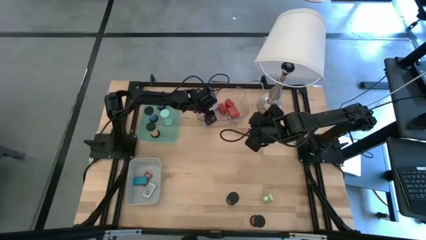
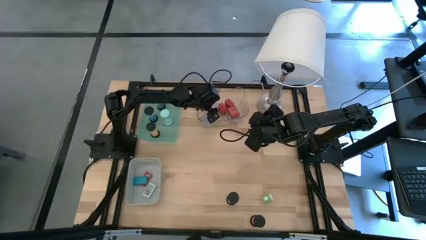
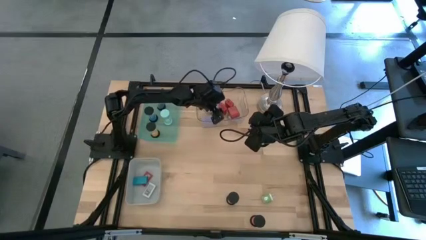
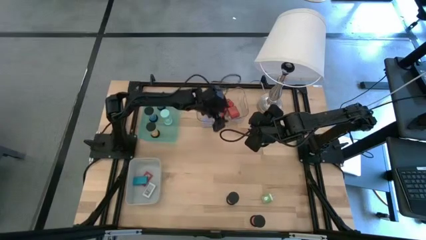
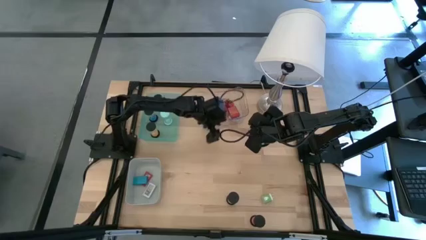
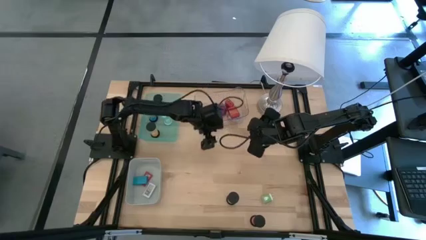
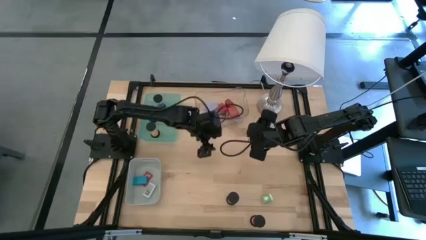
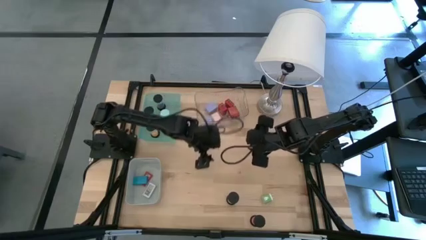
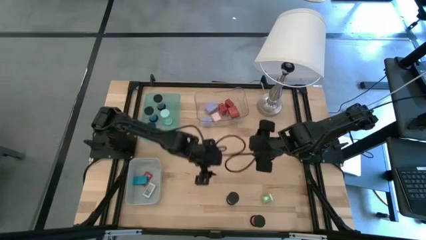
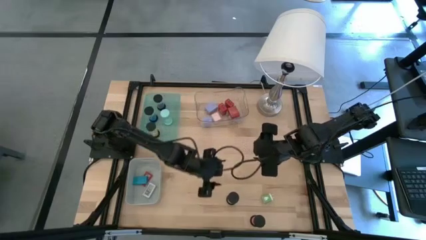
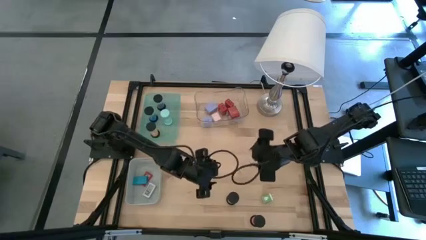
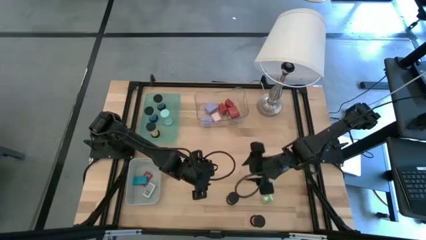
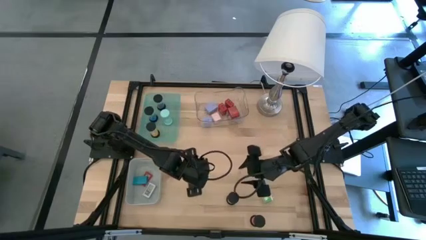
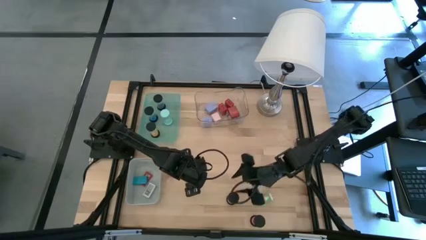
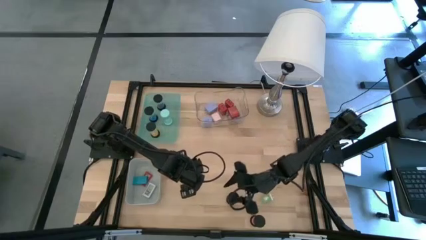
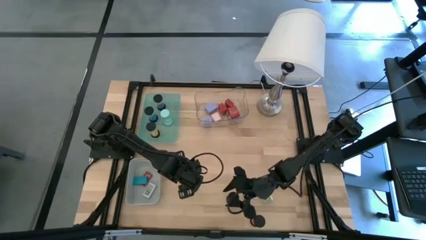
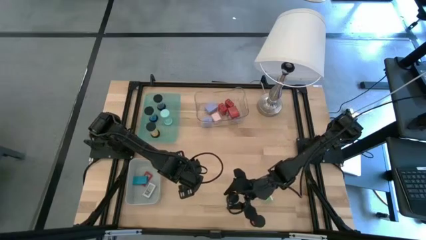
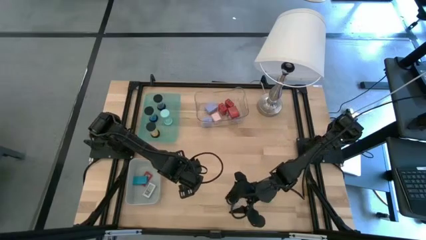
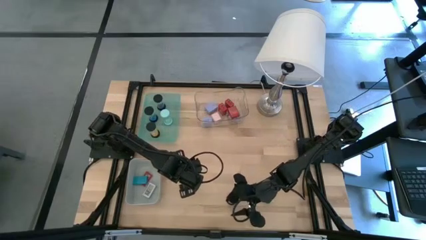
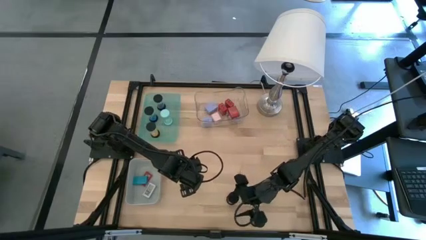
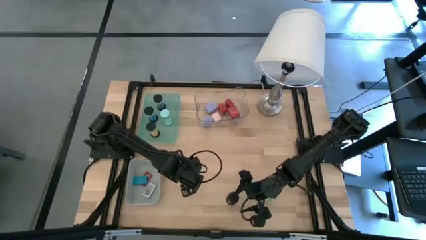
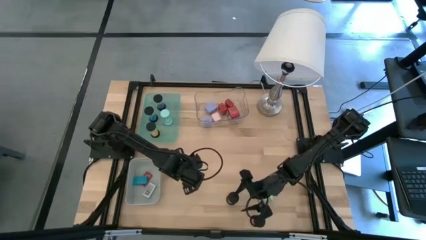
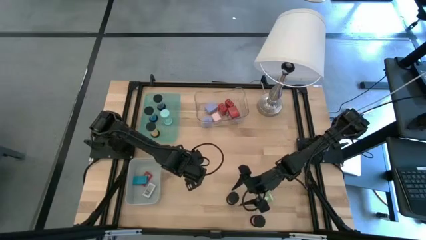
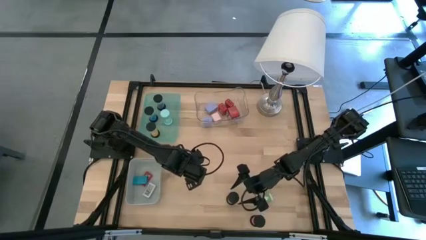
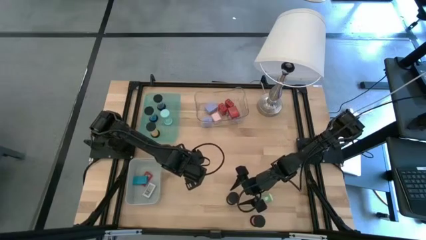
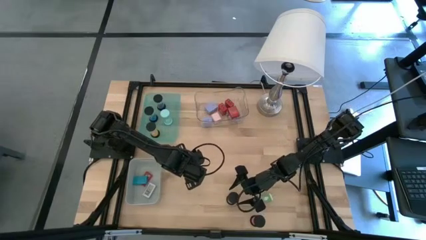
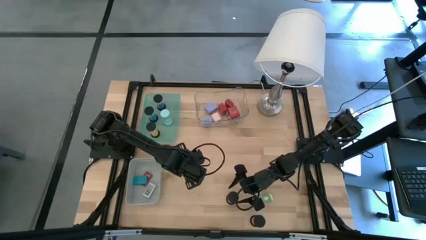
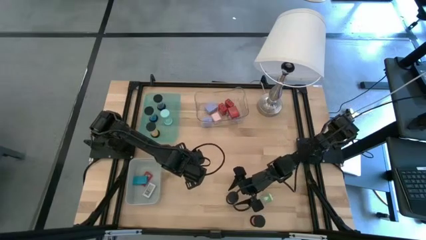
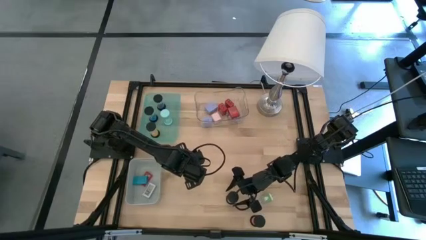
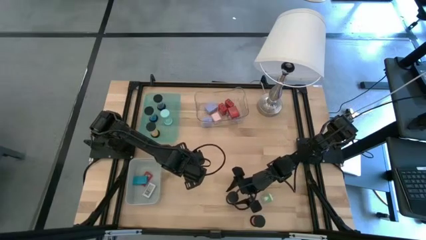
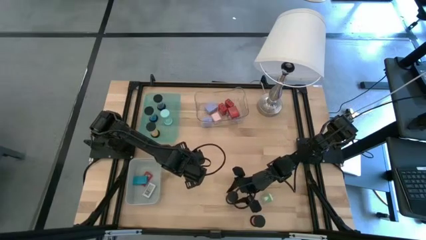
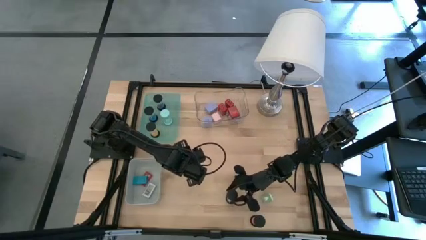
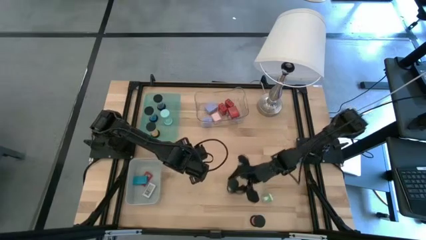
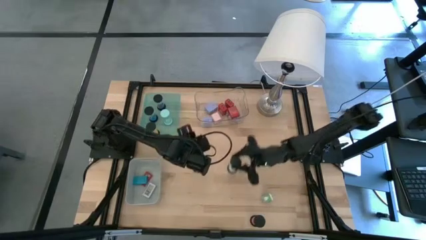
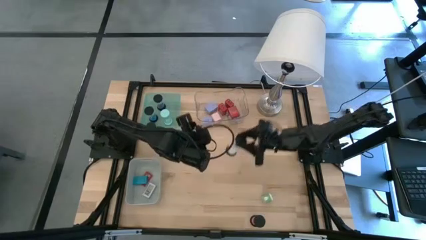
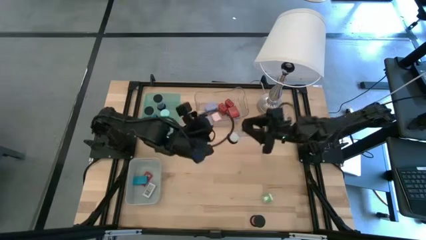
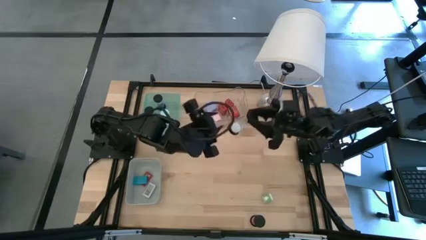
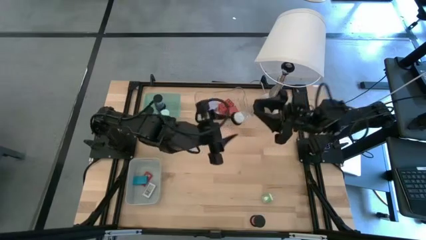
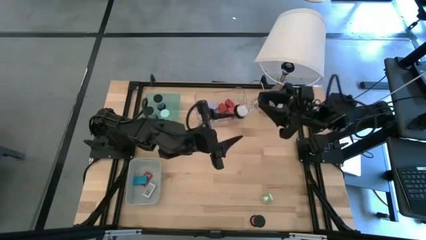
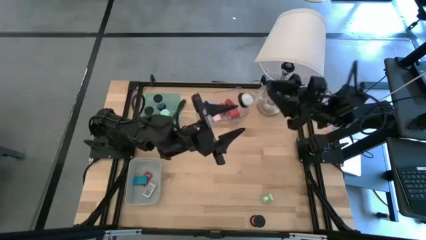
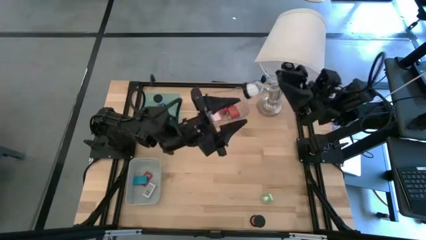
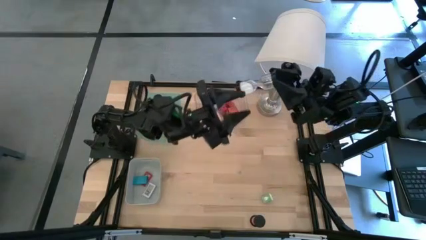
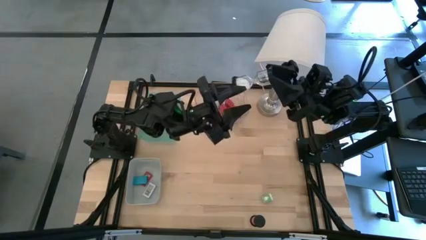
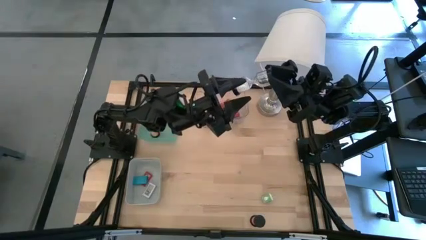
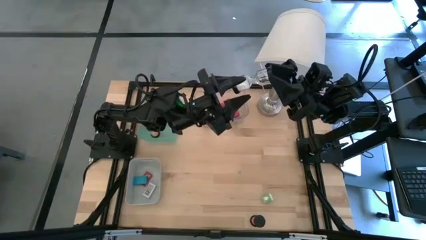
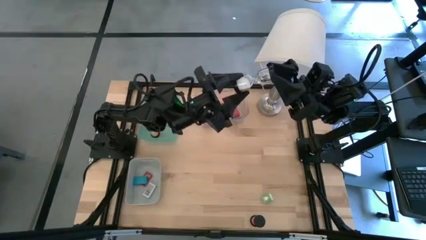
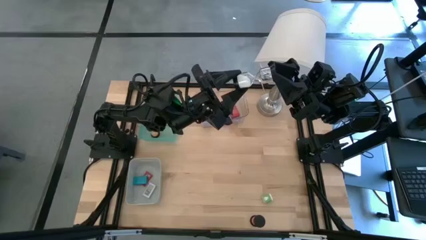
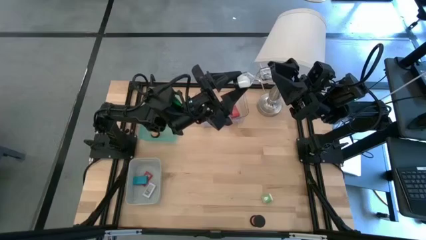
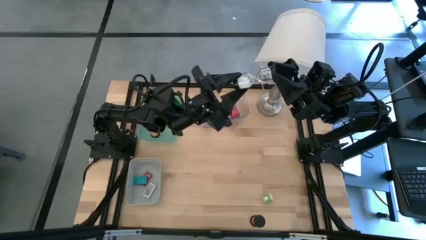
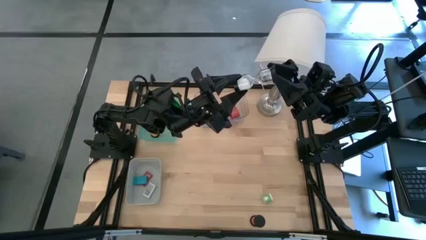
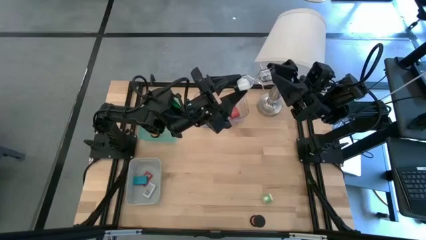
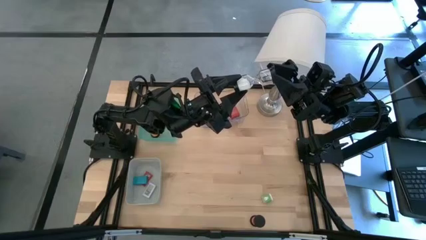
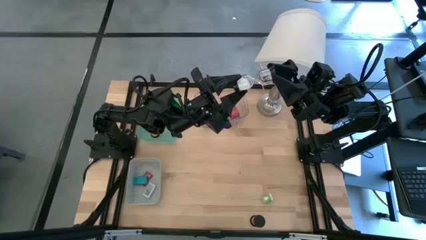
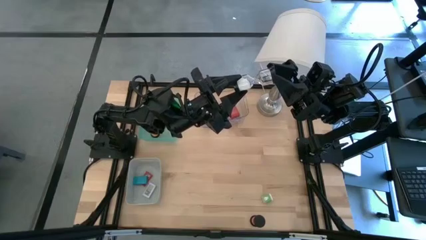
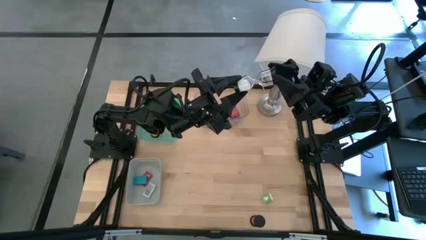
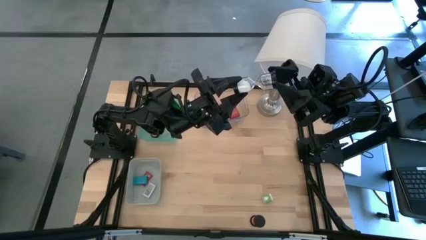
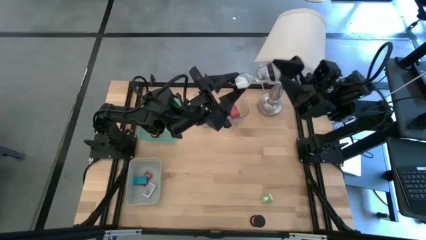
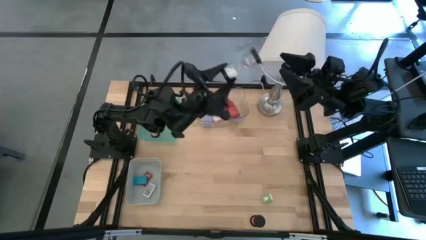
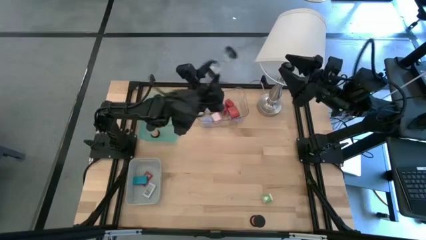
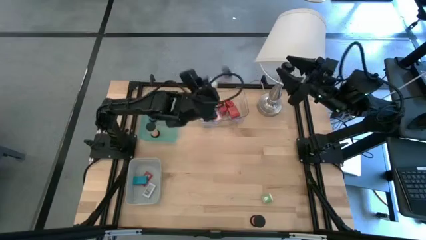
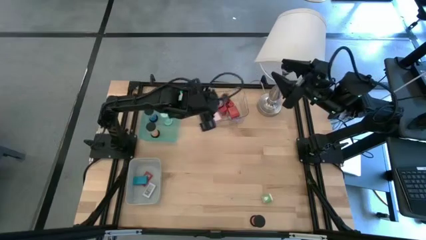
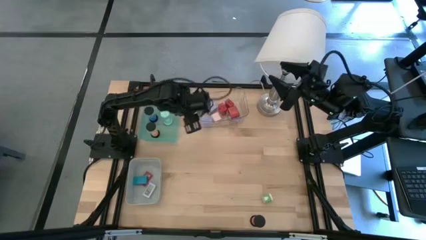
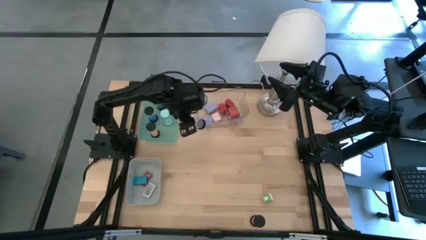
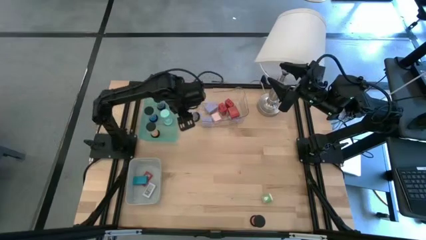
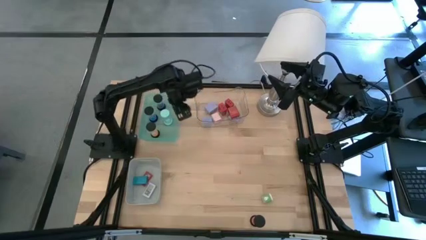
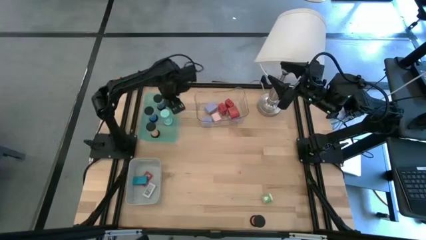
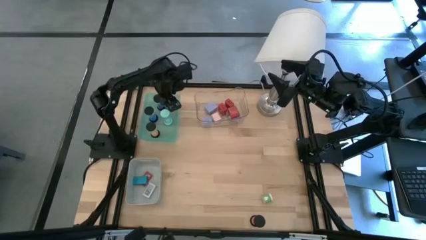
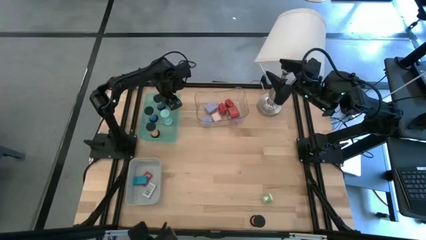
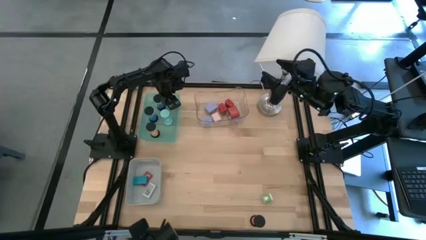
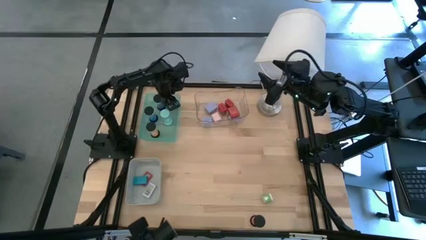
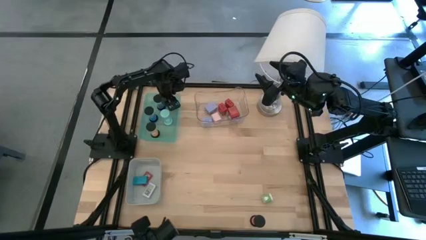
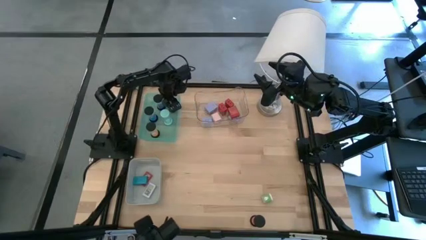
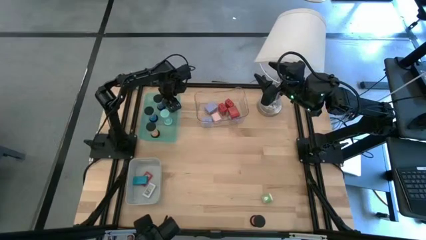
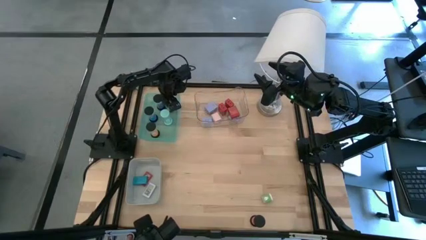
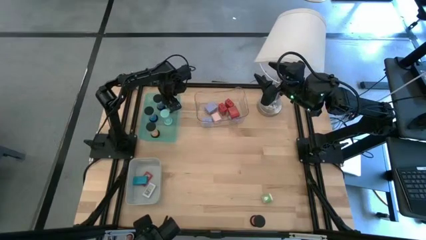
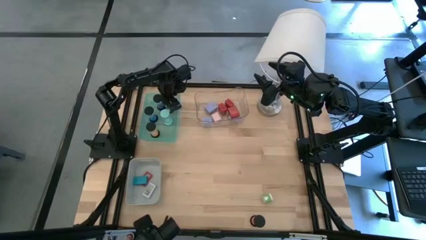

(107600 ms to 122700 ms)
Task: Pick & Place Office items
Put the white hourglass into the green bin

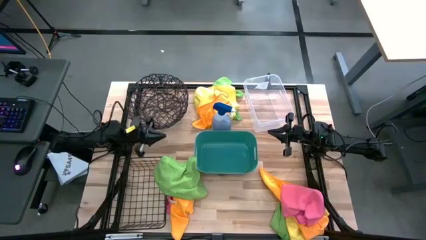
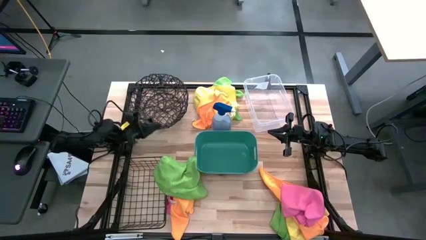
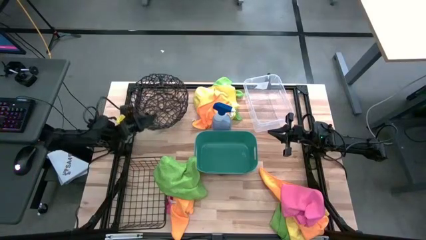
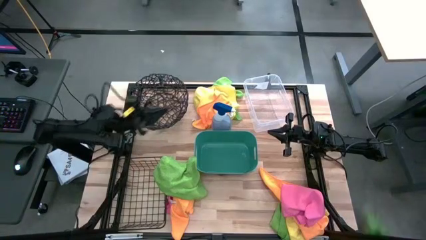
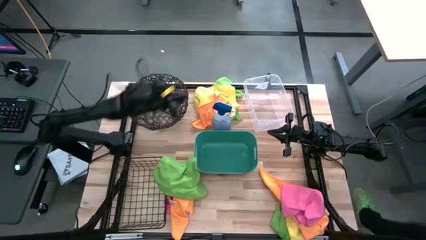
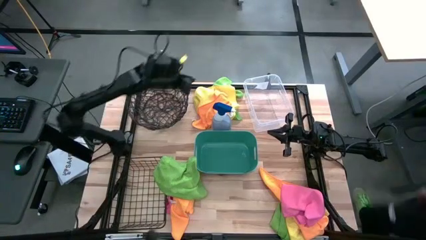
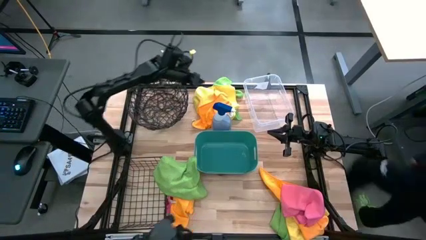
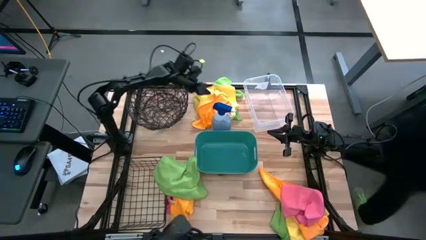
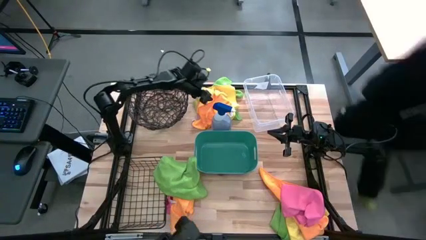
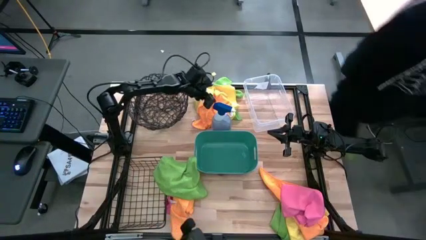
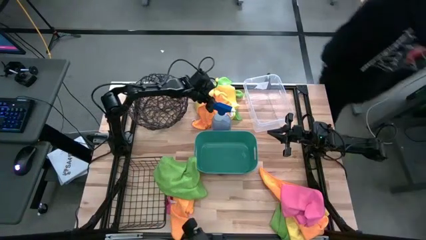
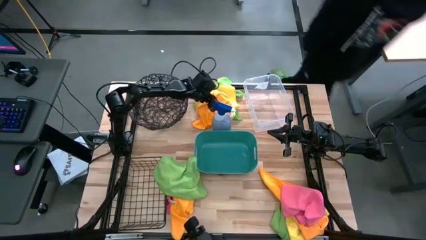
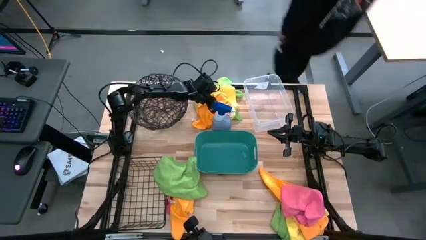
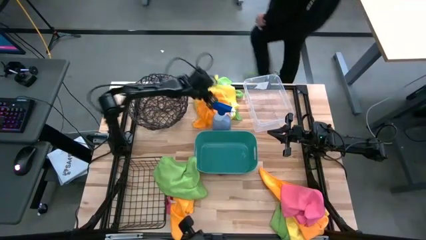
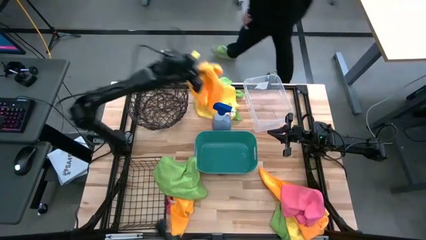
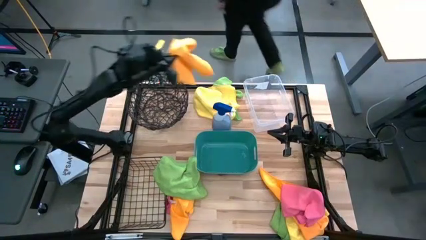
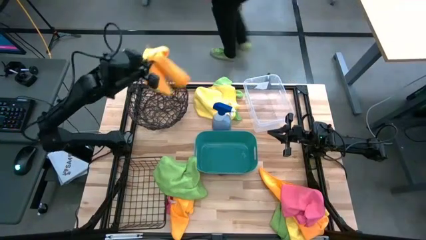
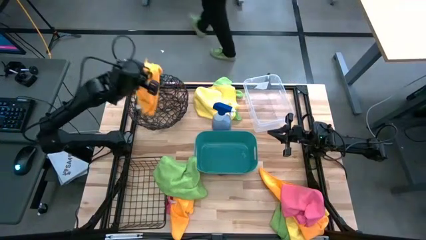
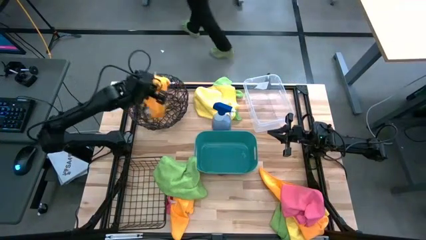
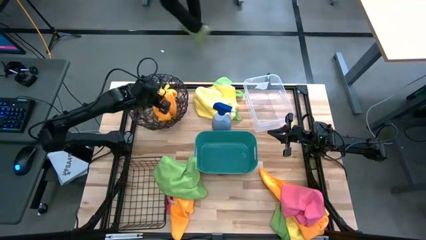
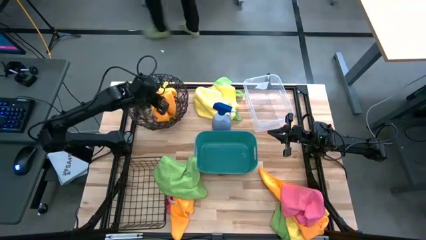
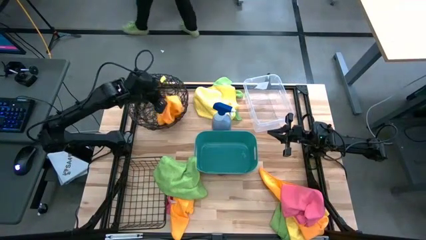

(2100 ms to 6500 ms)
Task: Sort microfiber towel by color & place in baskets
Put the orange towel into the circular wire basket
